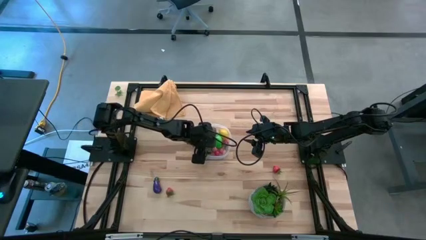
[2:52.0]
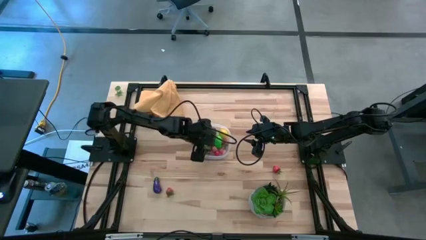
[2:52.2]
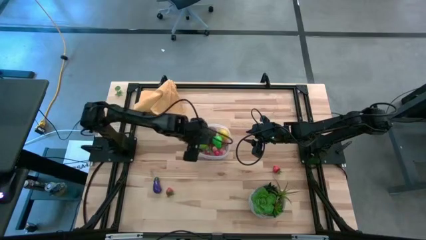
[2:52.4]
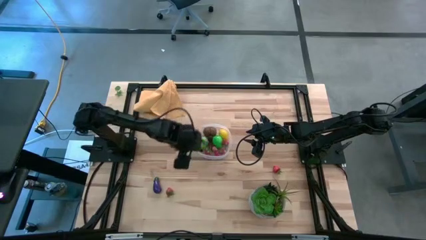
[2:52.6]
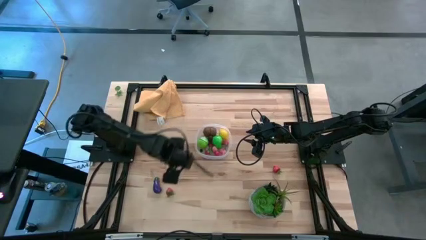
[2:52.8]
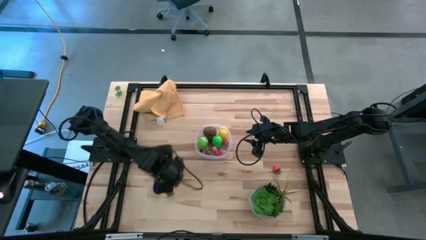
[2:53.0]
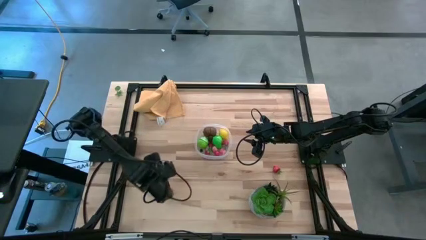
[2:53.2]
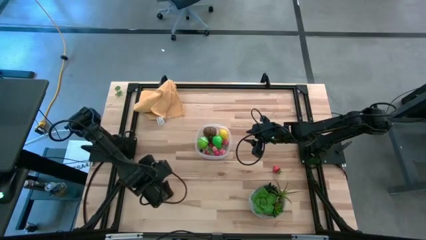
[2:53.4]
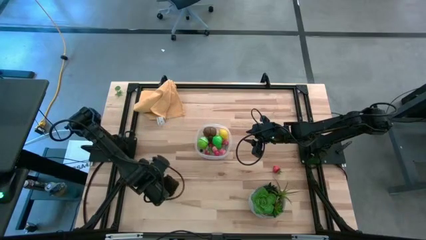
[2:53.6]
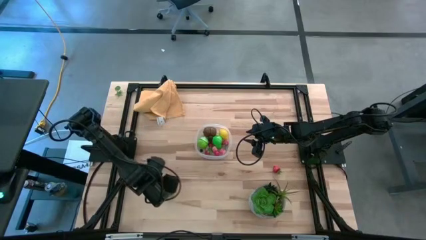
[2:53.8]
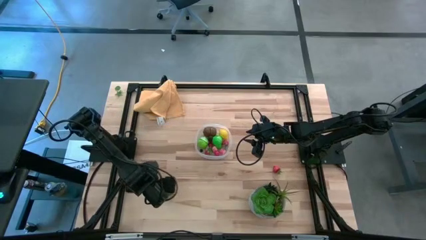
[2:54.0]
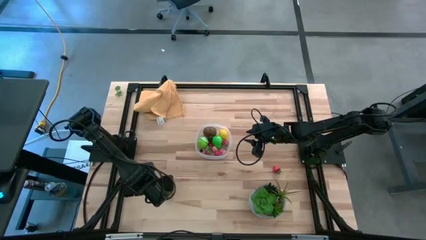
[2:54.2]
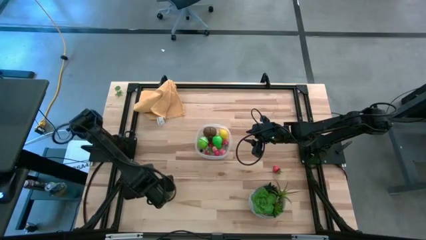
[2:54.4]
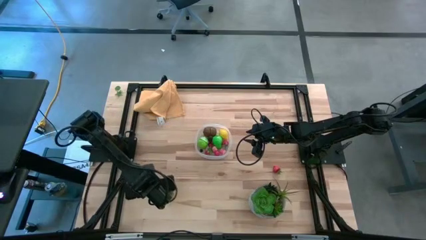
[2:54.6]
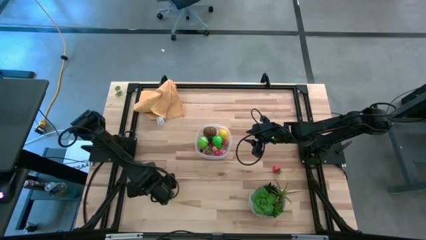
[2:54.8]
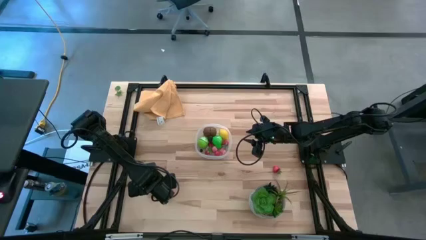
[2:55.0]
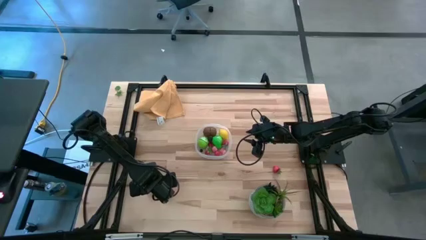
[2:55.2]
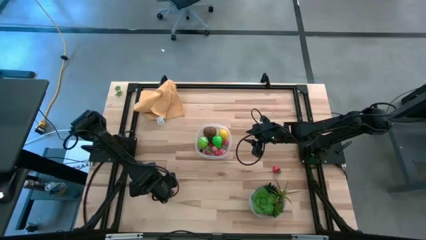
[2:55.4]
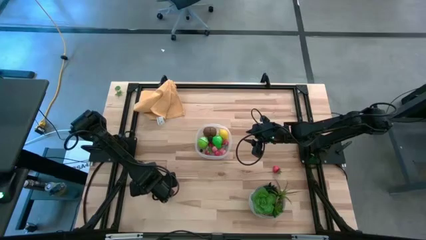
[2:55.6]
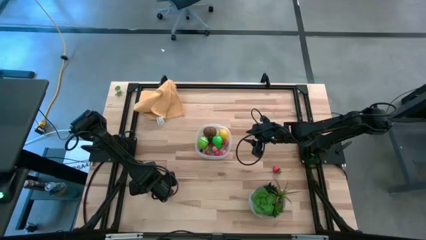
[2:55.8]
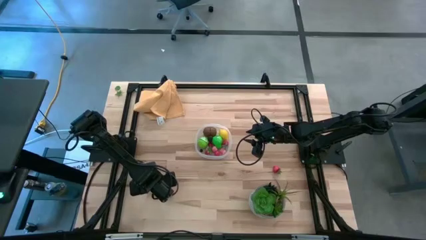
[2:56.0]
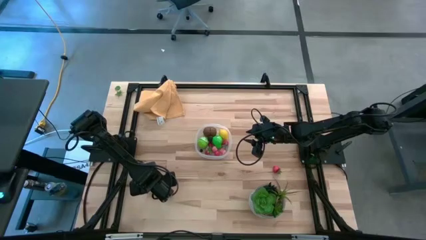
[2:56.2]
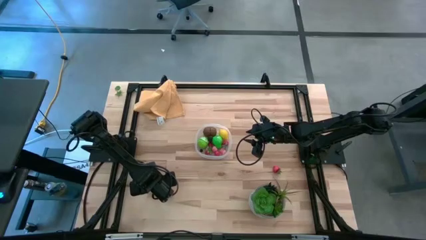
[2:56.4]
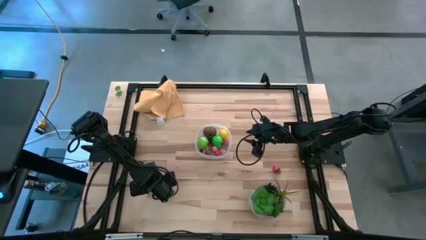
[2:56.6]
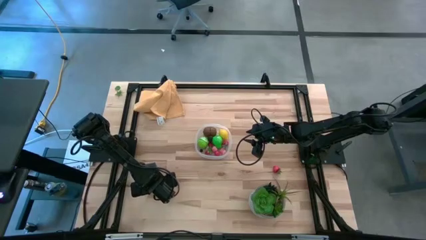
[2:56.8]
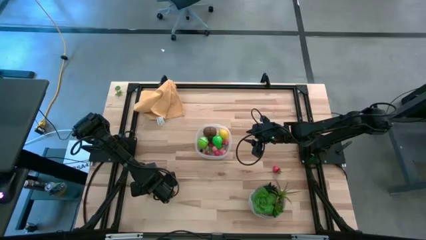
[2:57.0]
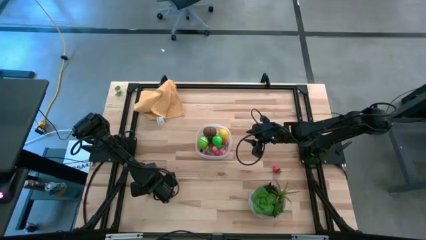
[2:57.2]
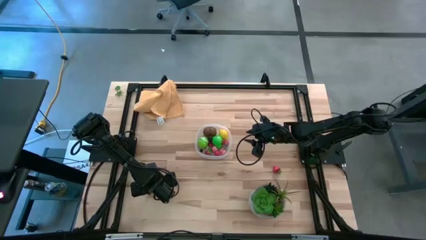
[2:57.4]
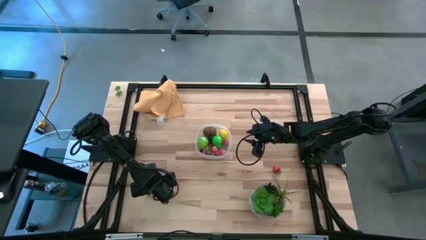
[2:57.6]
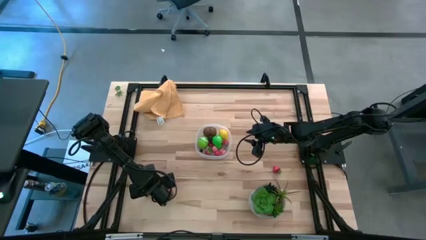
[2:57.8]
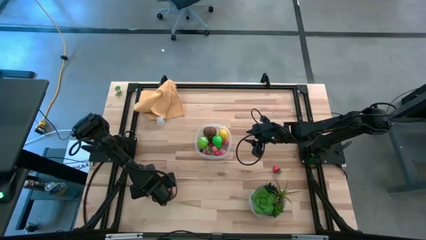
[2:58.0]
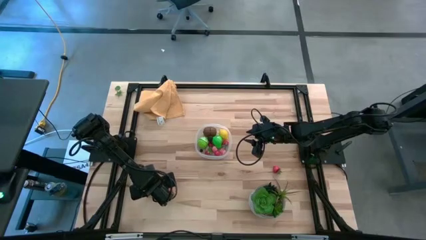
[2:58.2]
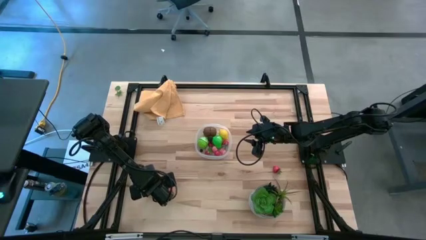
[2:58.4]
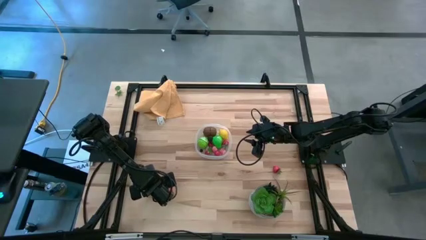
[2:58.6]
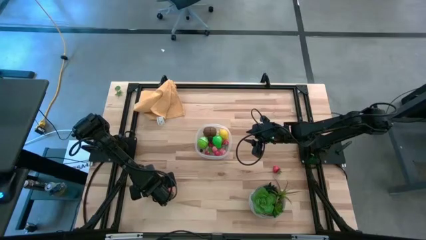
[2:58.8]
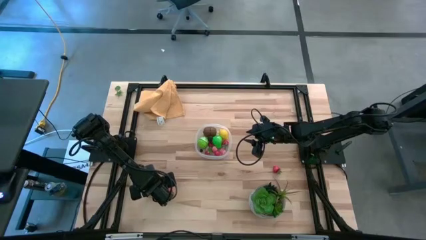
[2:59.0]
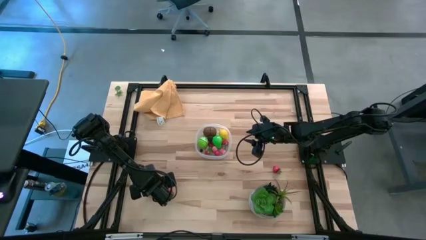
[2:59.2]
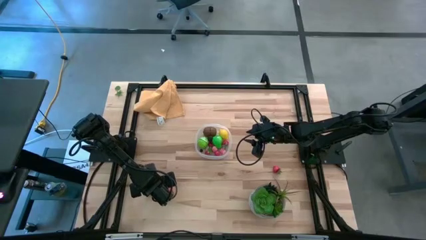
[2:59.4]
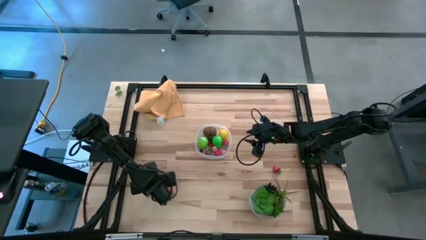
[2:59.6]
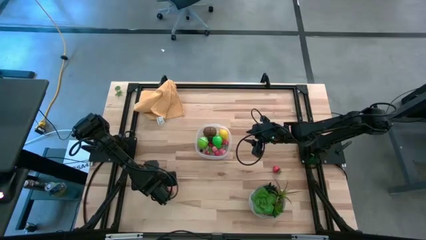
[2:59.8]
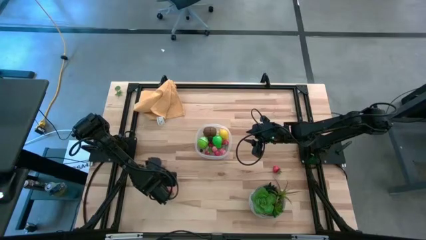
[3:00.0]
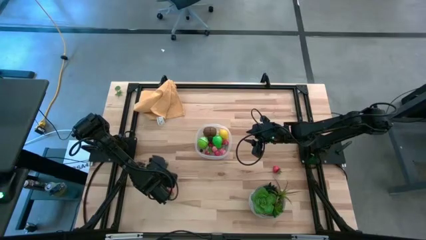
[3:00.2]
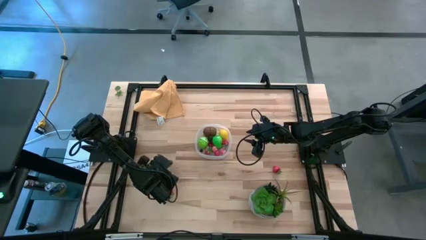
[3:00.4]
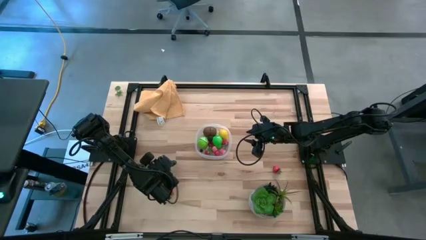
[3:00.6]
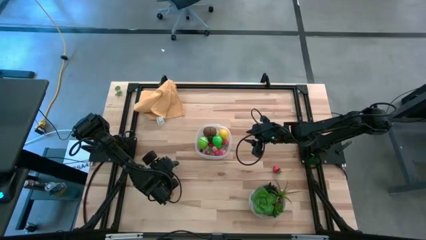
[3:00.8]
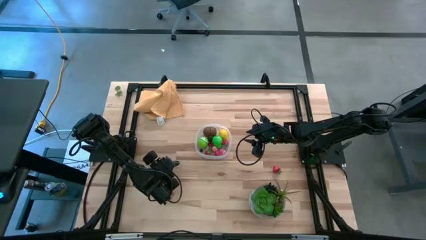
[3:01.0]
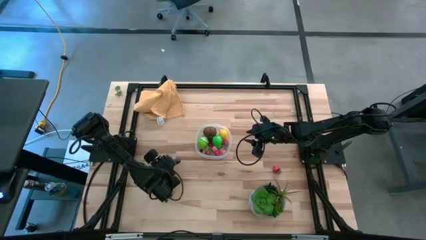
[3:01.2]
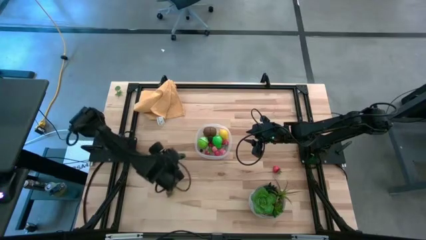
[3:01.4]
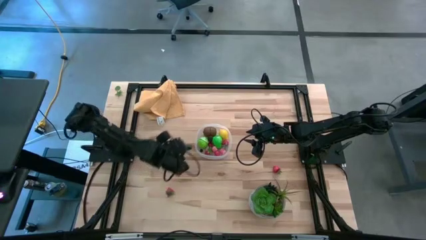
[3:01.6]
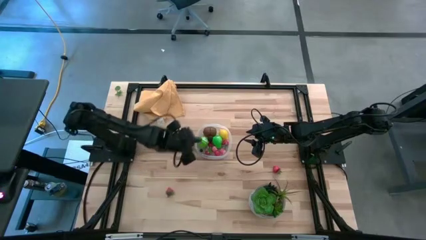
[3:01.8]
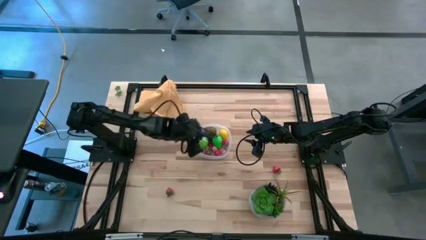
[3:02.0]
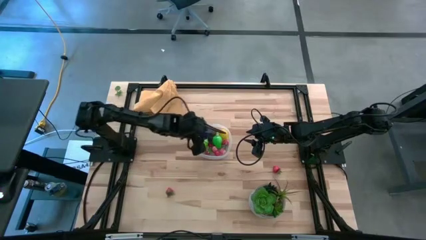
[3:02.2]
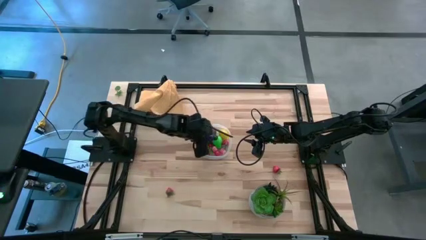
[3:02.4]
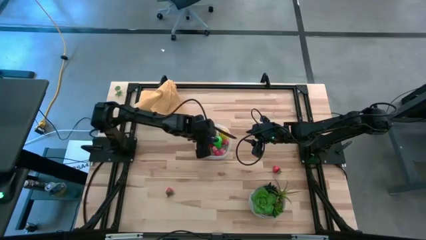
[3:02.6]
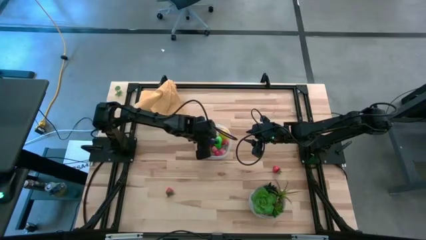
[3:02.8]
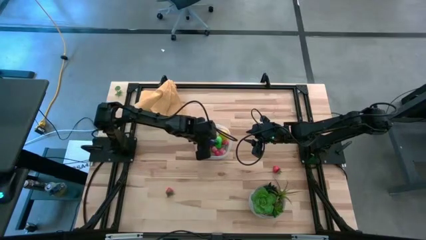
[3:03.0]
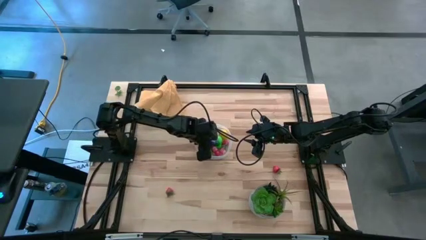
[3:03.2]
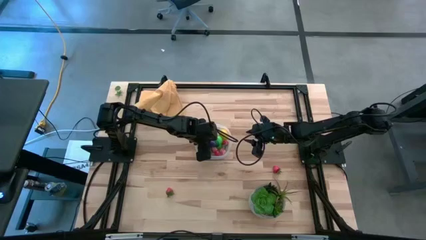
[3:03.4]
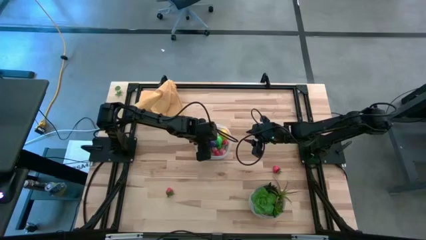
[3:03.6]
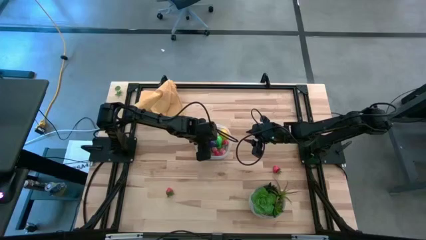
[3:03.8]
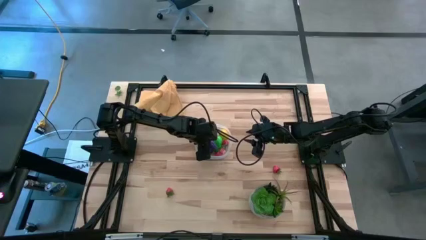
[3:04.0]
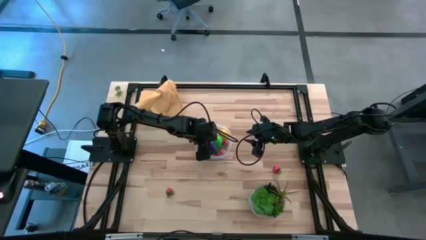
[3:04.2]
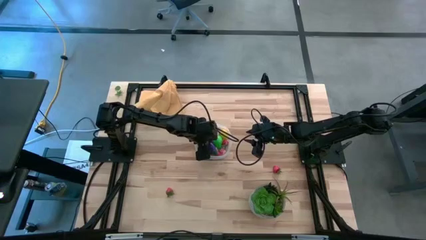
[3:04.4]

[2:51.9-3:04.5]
Task: Pick and placing Produce into tupperware
Put the eggplant into the transparent bin

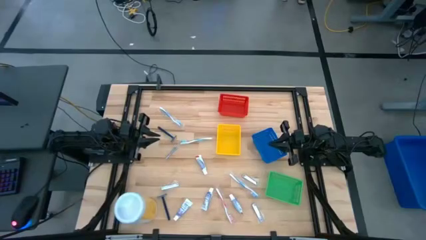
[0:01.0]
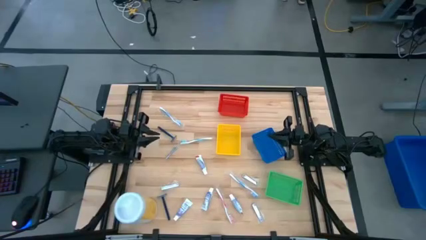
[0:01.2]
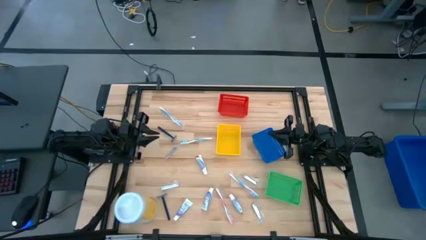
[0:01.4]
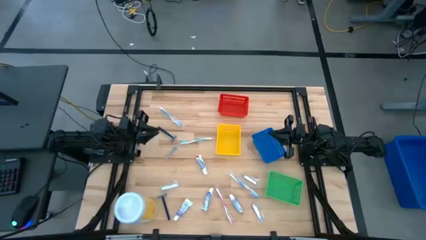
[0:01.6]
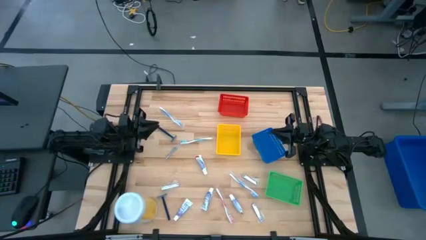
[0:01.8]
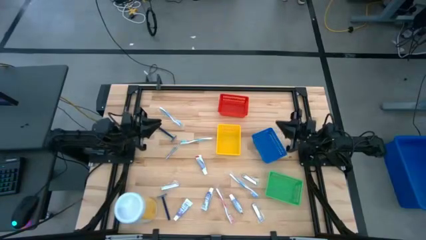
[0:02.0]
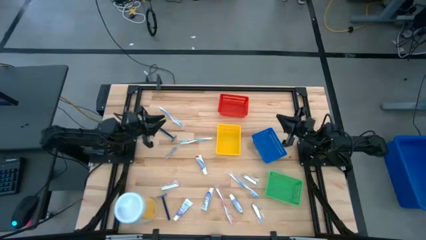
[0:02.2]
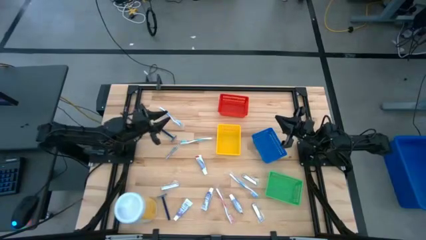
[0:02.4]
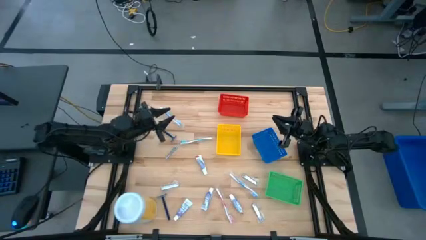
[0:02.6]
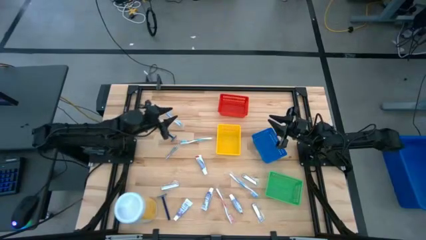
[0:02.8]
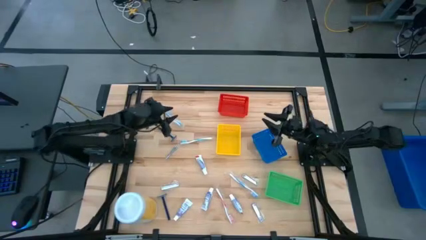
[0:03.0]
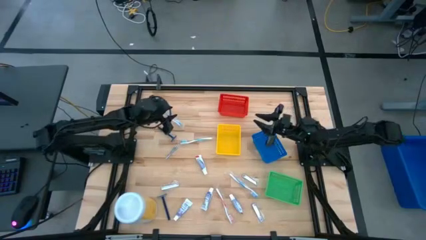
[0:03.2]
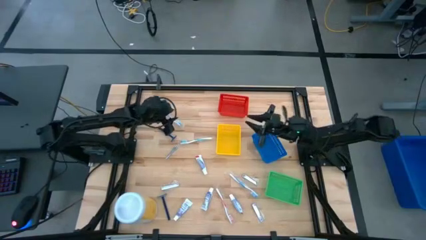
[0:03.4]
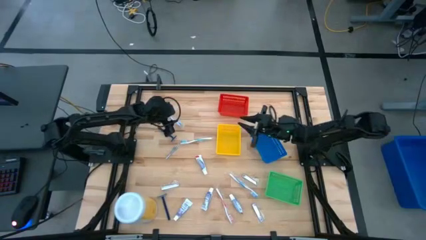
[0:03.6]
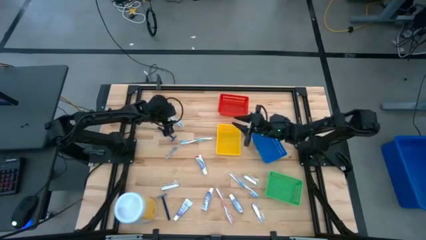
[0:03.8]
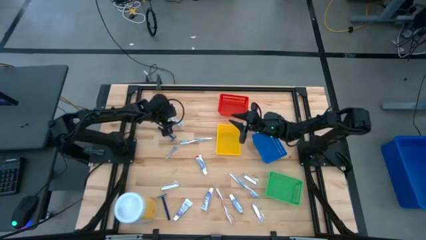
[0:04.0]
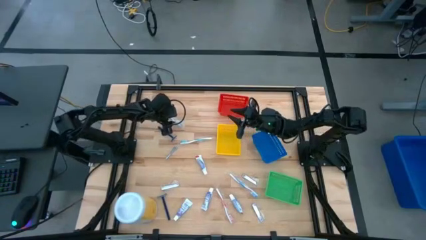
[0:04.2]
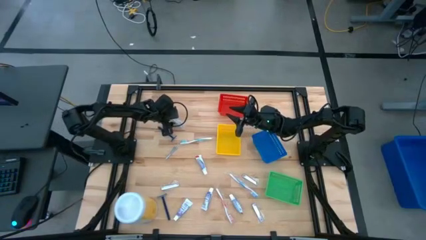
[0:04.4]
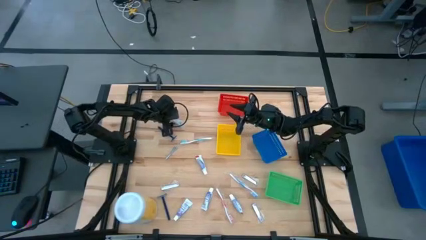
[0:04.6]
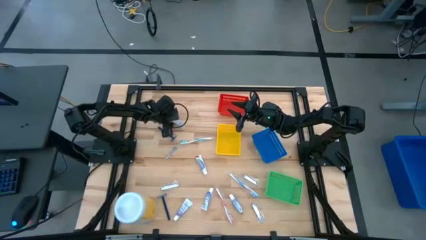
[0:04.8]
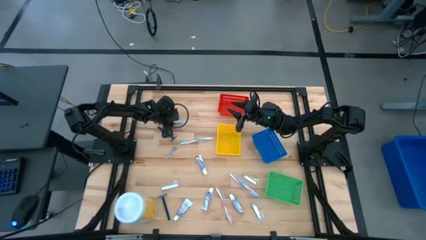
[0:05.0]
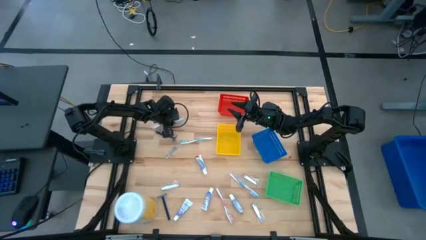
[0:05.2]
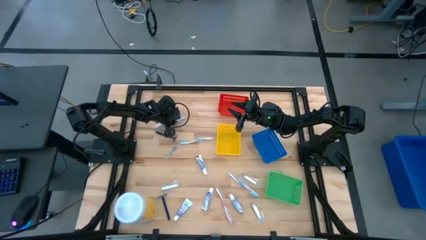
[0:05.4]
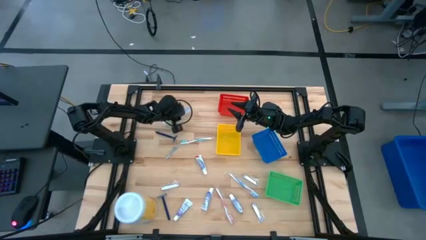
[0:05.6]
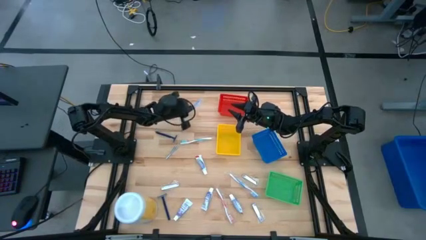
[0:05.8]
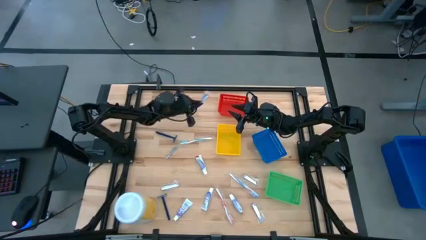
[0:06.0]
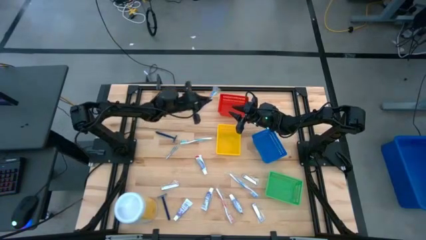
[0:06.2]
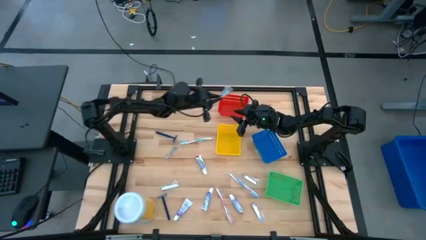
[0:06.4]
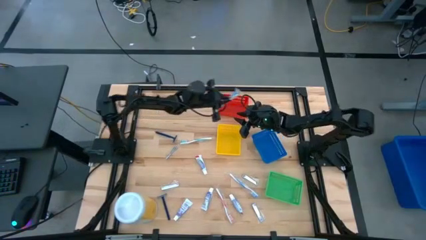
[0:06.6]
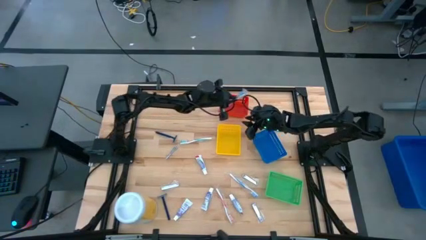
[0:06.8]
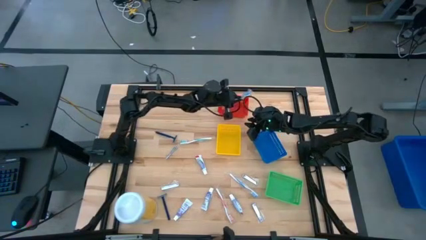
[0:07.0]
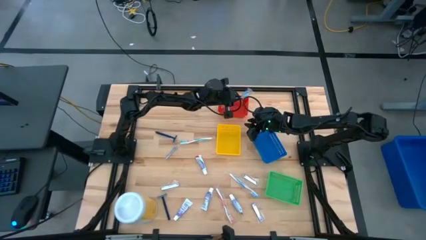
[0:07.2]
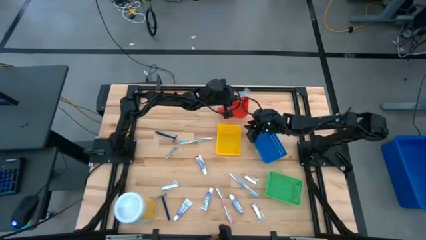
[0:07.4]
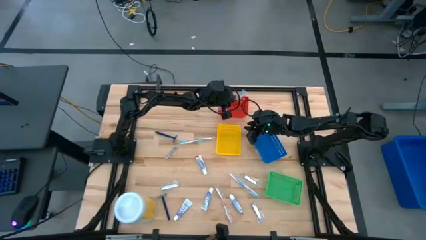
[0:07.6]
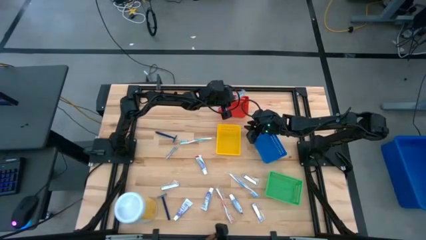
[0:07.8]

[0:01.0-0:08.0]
Task: Pick & Place Travel size toiletries
Put the blue toothbrush into the red bin
